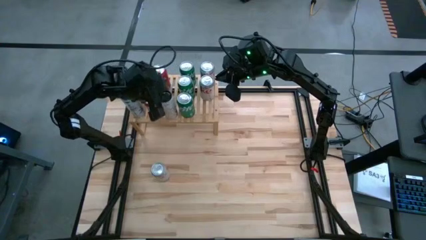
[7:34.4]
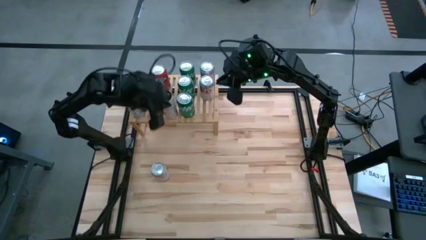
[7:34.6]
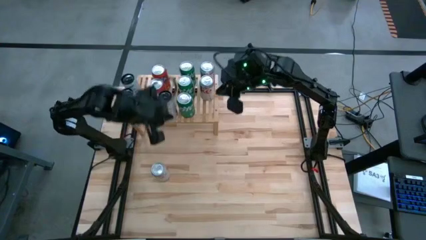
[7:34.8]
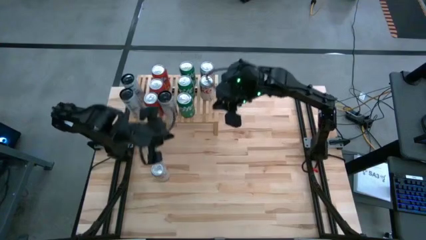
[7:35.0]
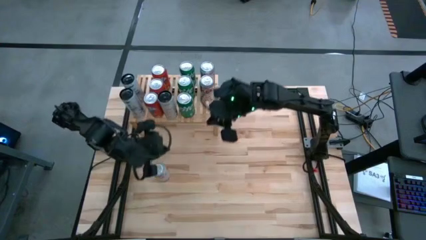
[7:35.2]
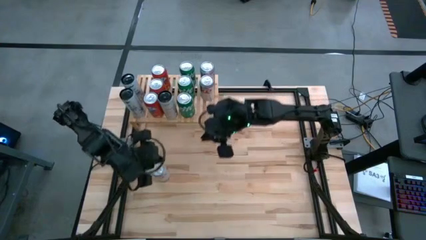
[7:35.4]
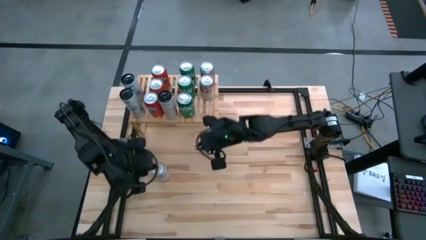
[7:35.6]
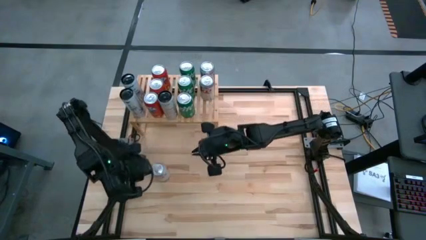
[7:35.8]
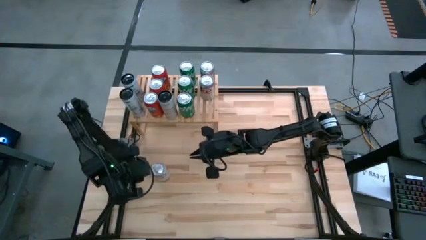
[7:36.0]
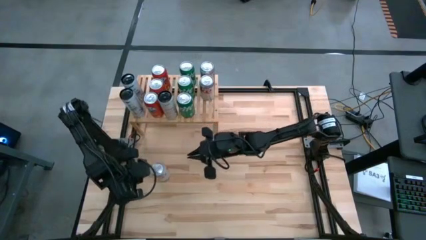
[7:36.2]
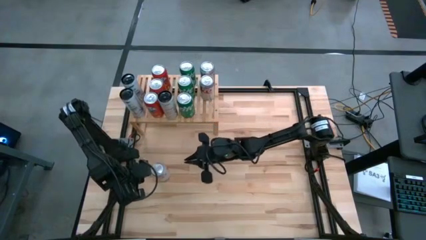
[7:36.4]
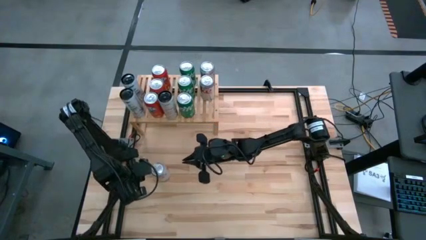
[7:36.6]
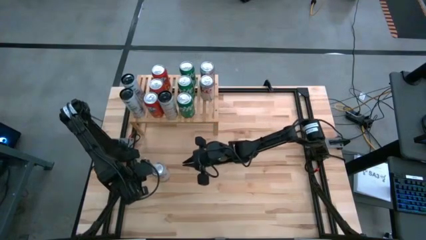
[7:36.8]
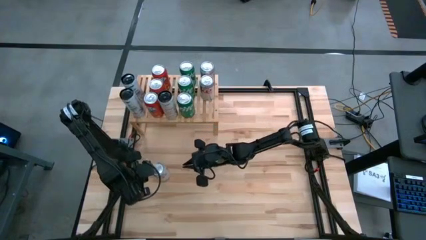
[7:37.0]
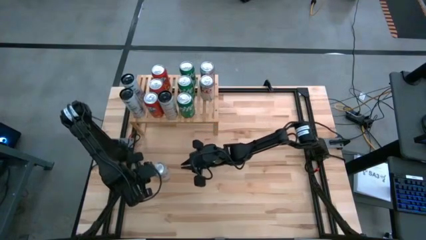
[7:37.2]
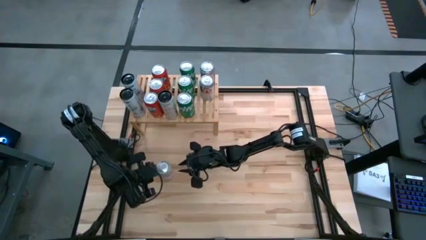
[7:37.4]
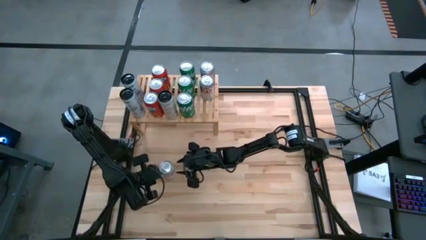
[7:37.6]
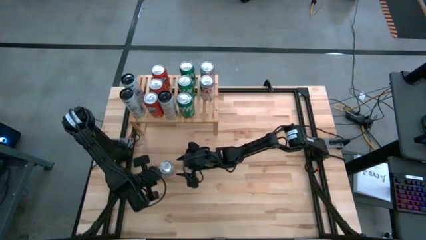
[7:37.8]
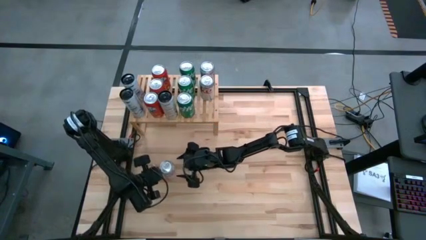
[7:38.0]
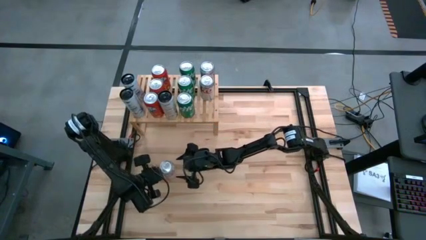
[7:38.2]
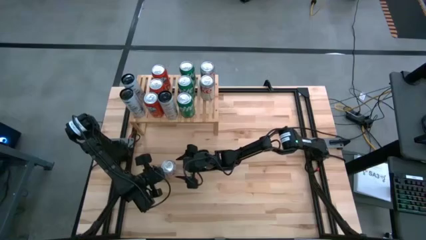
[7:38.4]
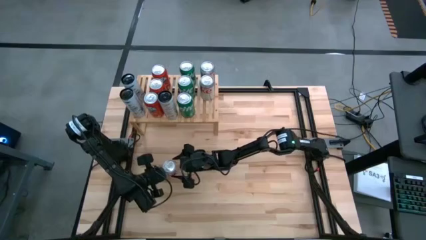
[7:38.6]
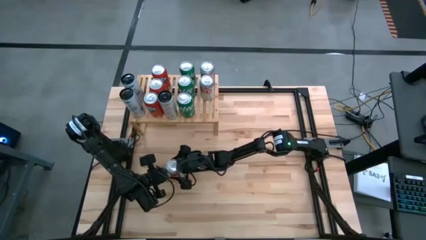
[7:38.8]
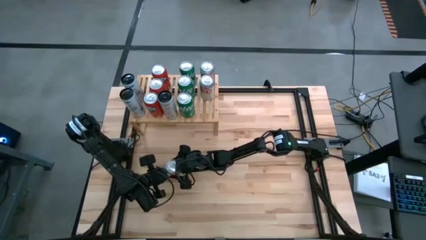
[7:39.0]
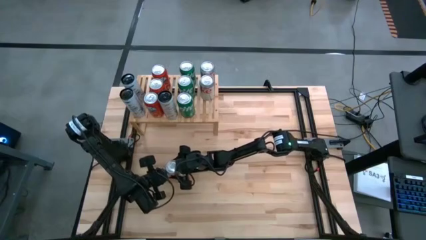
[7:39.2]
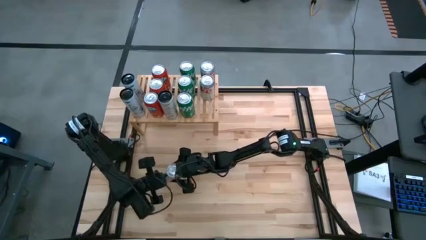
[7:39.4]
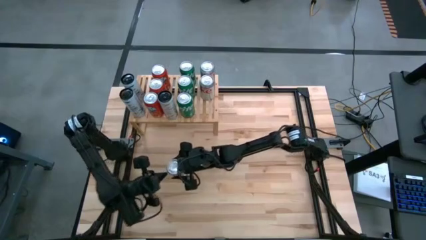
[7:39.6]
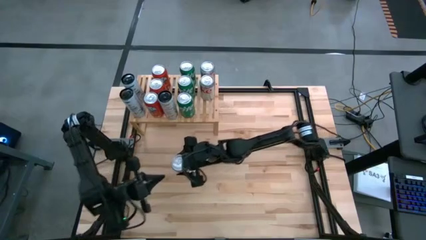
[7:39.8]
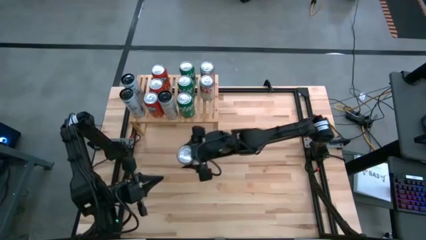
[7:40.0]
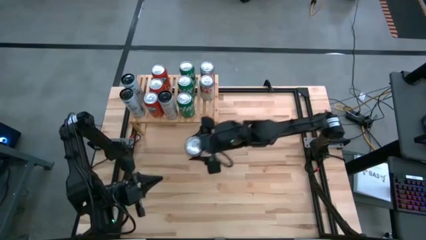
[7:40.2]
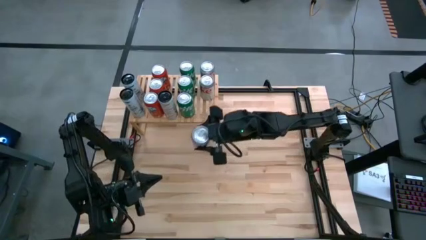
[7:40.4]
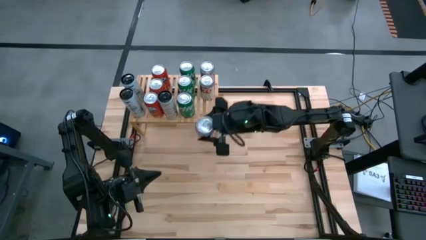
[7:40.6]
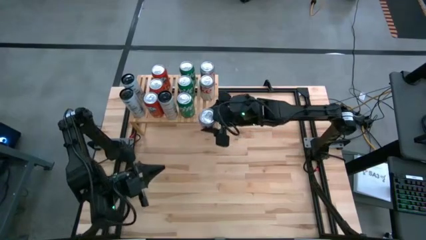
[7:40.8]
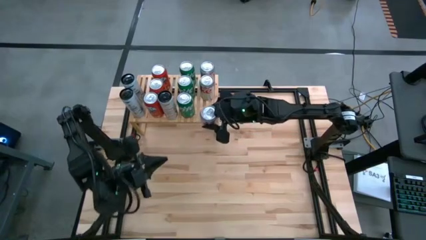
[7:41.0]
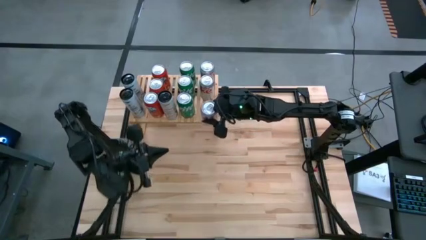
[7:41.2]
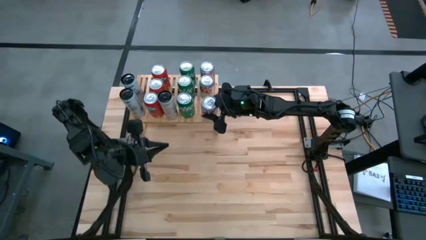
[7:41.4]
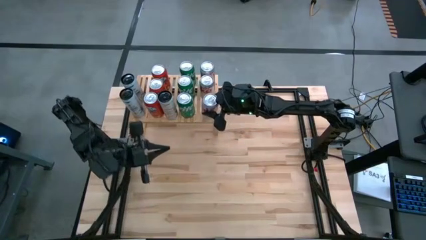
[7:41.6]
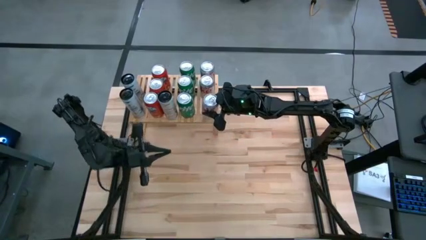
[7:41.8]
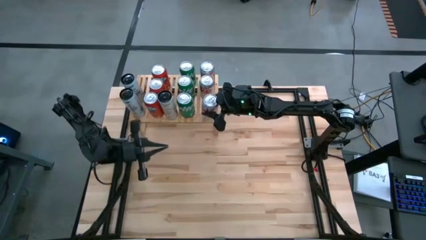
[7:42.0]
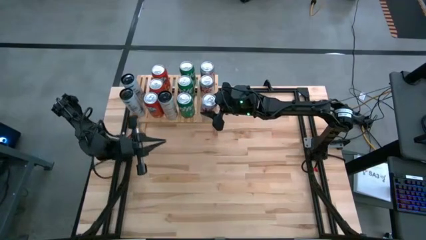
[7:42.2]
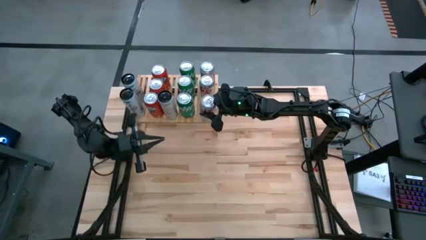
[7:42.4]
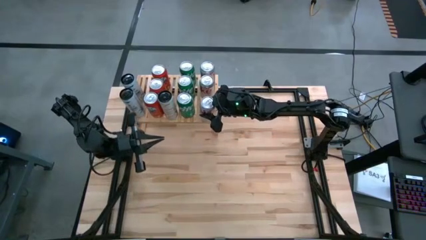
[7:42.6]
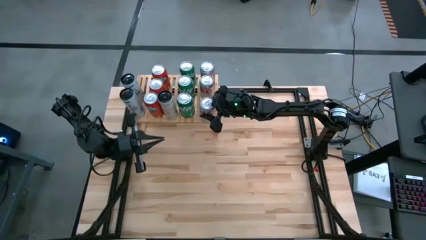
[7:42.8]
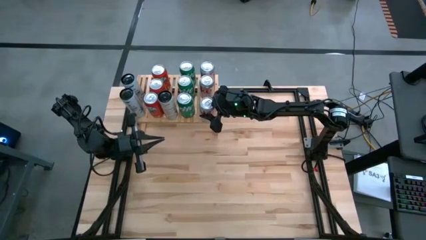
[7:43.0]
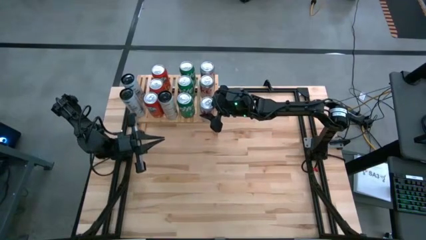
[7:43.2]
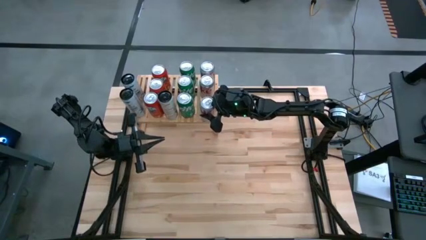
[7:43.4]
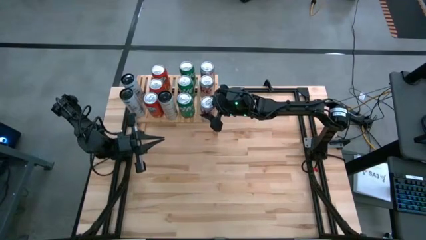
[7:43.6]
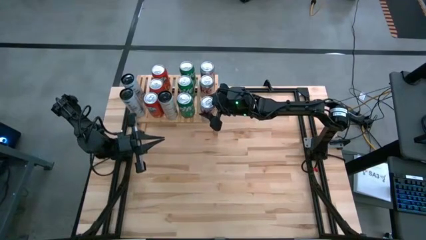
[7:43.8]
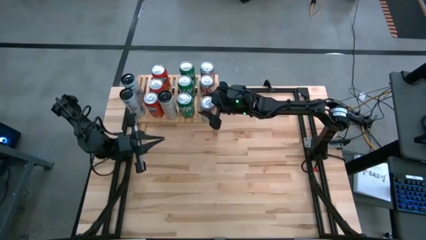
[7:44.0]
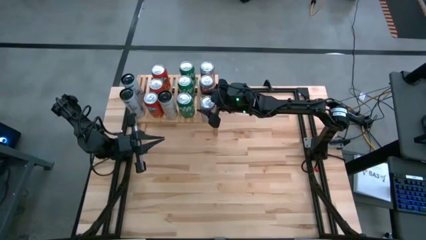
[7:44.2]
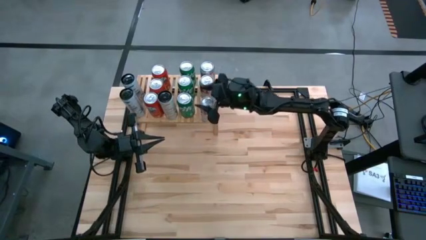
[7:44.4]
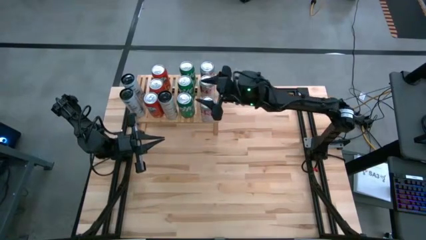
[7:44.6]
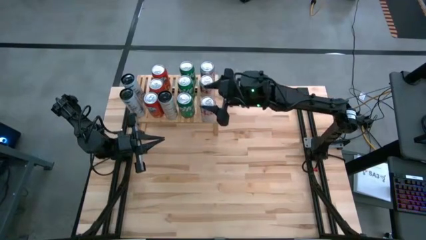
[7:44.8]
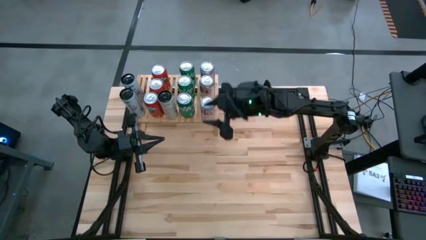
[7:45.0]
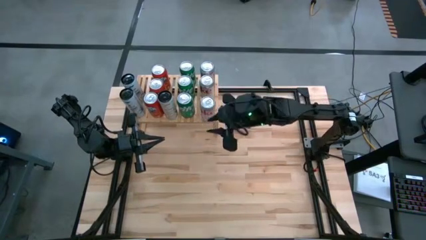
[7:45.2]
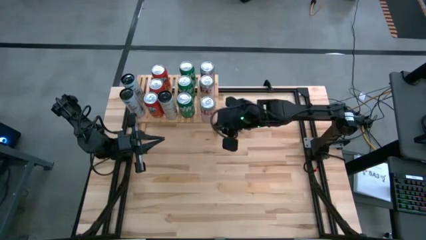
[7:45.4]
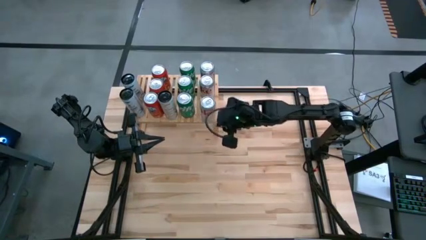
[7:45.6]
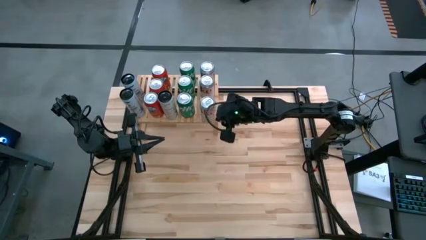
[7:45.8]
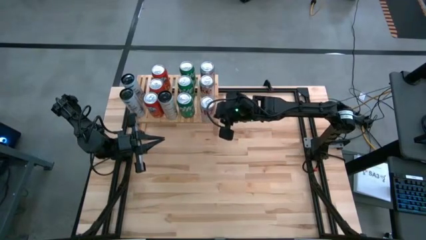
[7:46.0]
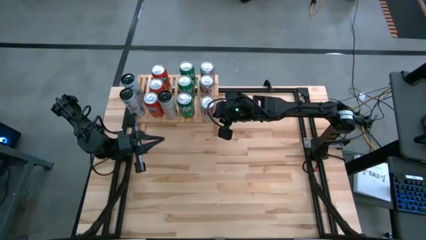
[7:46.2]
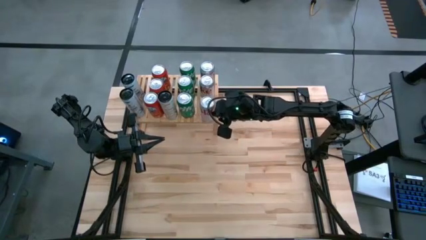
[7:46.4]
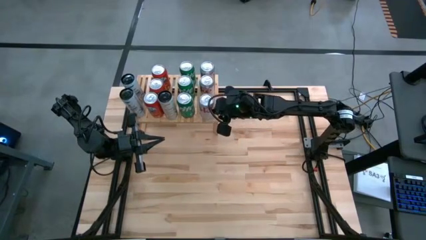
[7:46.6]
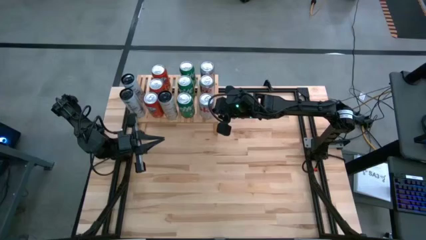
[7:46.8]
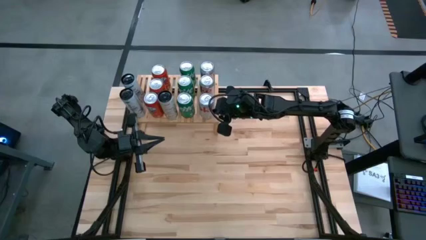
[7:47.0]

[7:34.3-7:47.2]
Task: Place canned beverage on shelf
Put the red/silver soda can on the shelf aligned with the other red/silver soda can

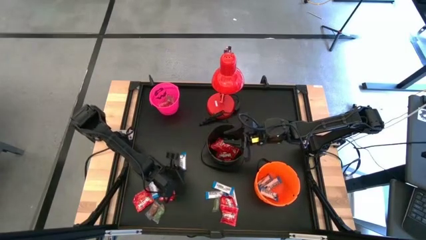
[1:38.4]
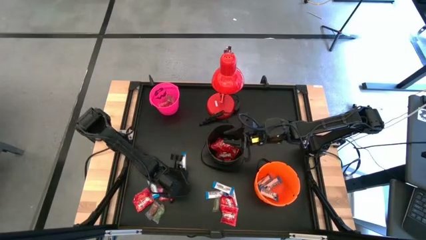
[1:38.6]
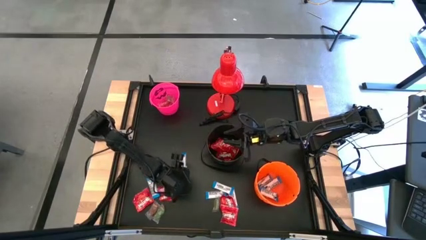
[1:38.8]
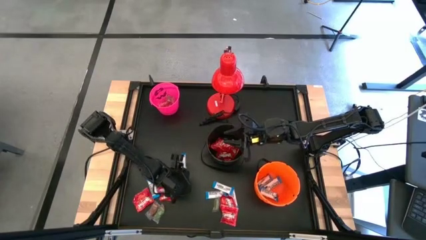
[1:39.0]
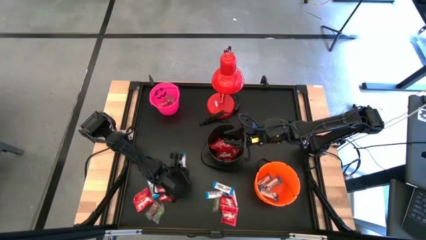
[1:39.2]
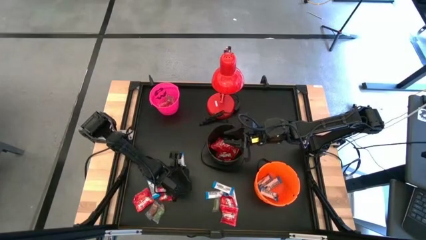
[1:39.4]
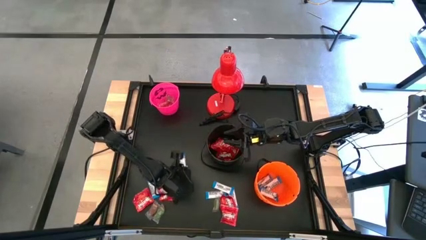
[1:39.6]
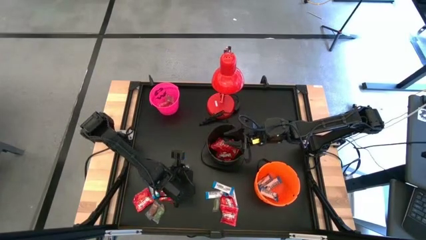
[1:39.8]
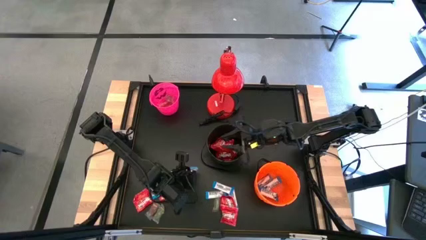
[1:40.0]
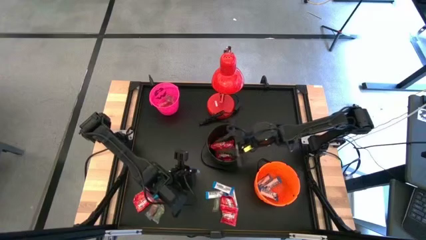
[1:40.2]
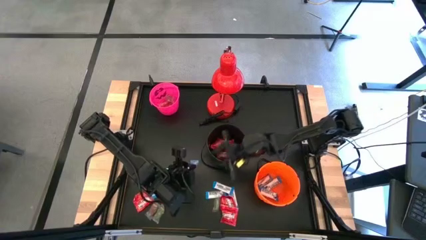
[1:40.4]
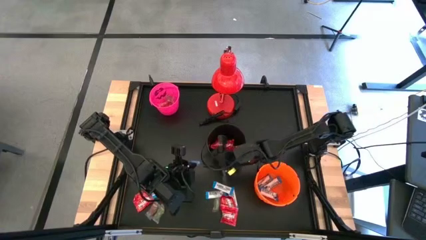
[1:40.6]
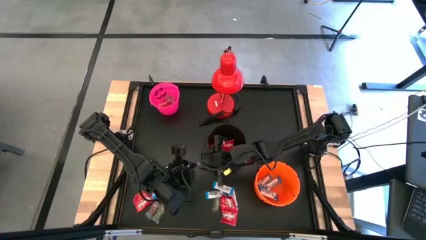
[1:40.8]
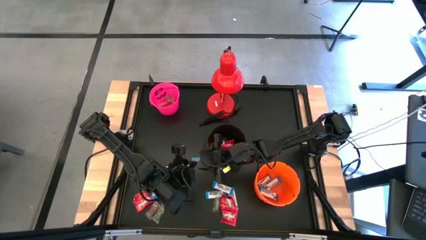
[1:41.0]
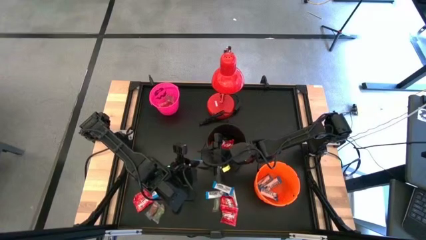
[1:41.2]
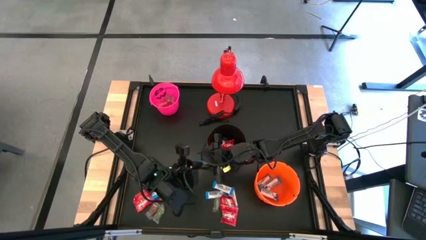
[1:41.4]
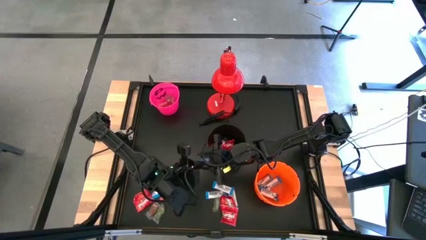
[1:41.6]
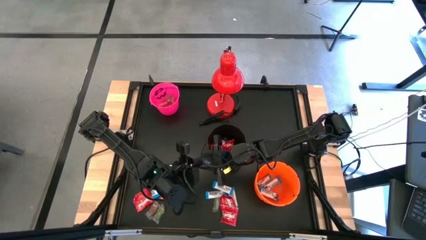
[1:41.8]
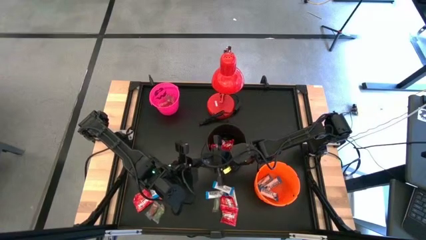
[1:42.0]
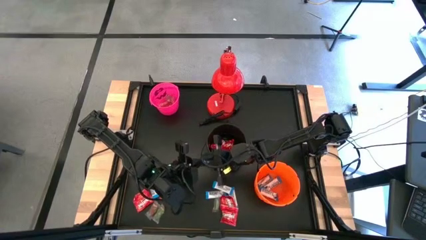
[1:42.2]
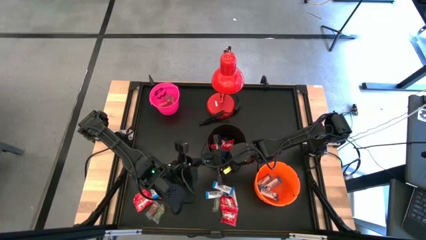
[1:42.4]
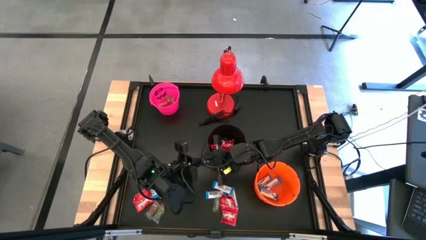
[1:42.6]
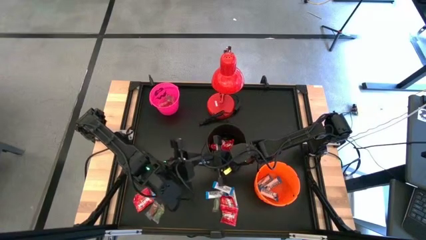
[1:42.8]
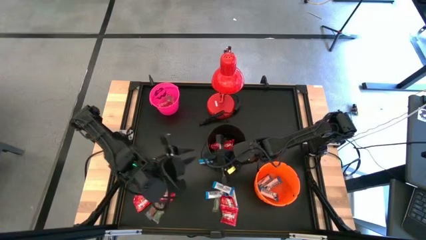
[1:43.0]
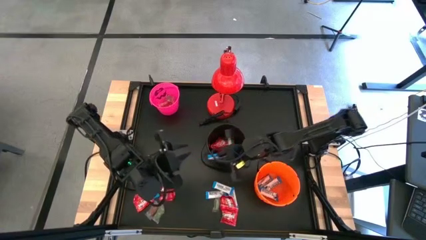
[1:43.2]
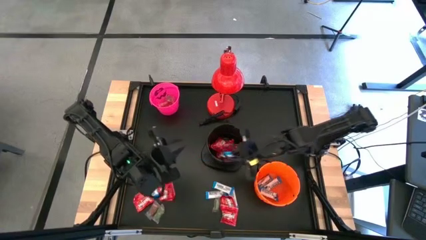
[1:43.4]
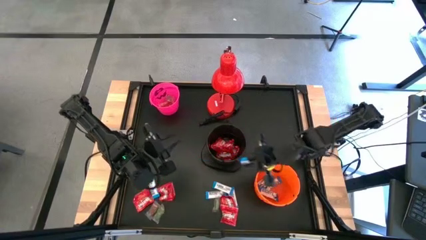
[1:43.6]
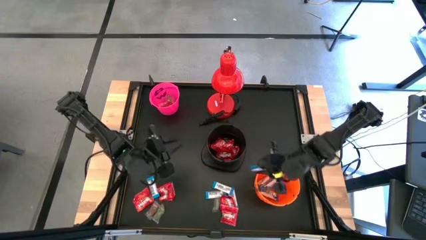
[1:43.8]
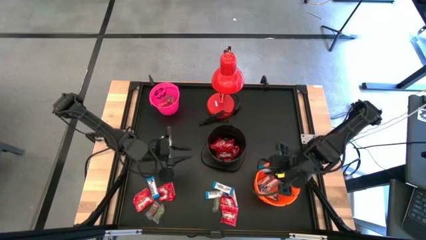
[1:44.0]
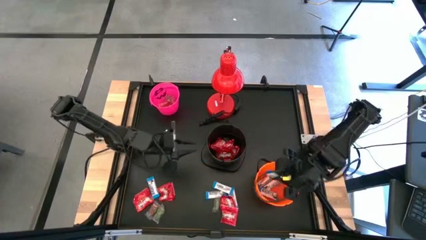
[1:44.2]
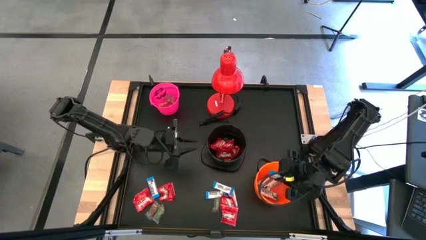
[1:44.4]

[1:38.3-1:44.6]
Task: Organize candy in baskets
Put the white chocolate into the orange bucket
